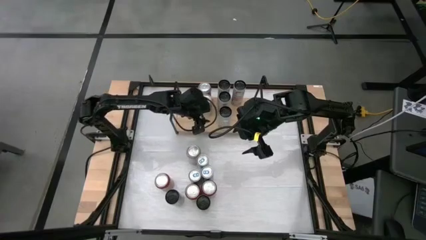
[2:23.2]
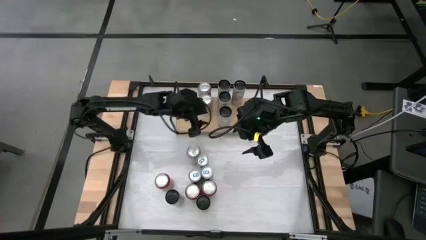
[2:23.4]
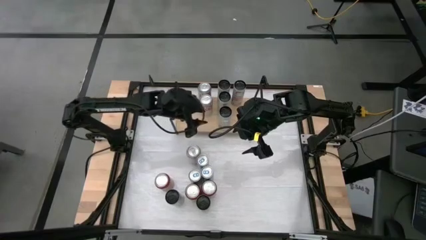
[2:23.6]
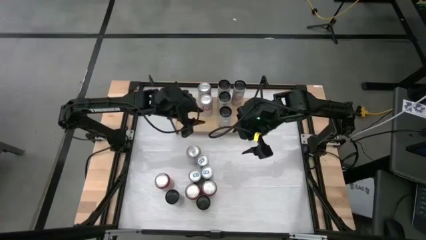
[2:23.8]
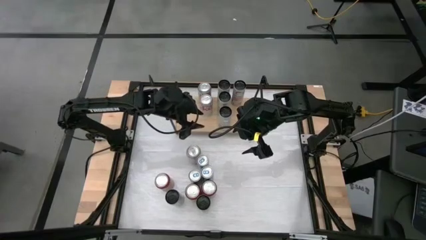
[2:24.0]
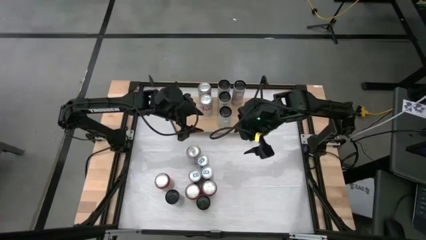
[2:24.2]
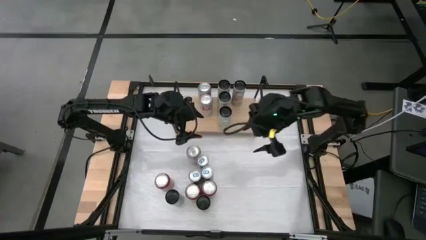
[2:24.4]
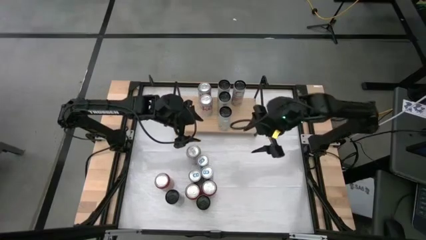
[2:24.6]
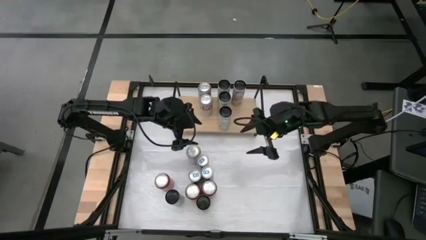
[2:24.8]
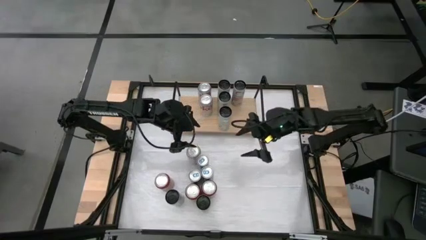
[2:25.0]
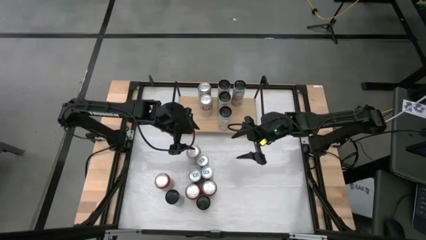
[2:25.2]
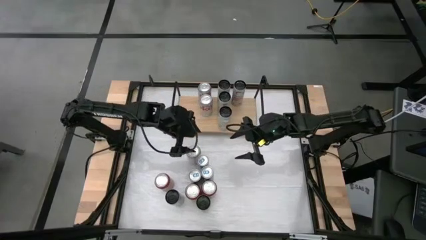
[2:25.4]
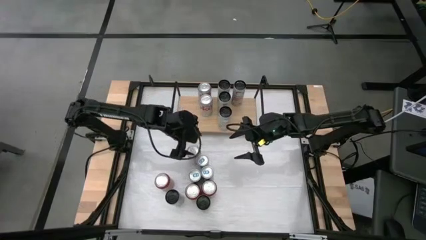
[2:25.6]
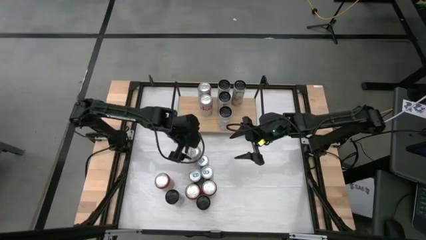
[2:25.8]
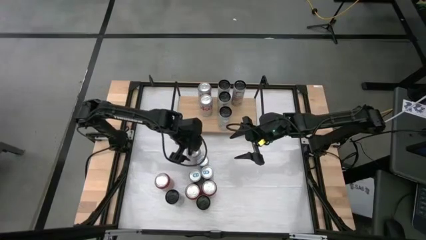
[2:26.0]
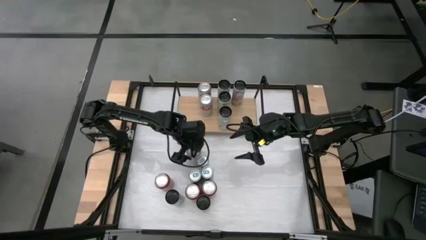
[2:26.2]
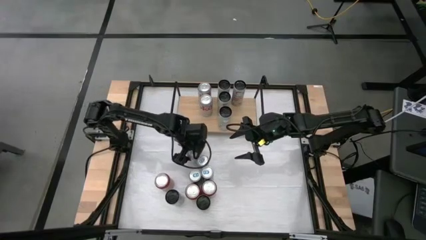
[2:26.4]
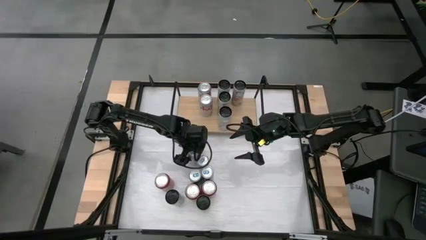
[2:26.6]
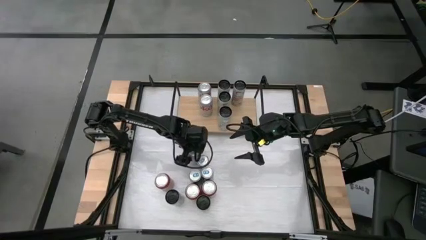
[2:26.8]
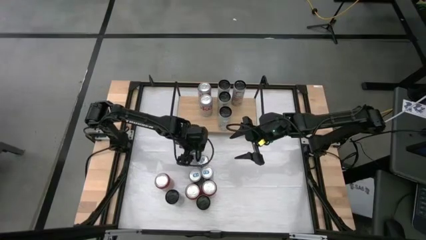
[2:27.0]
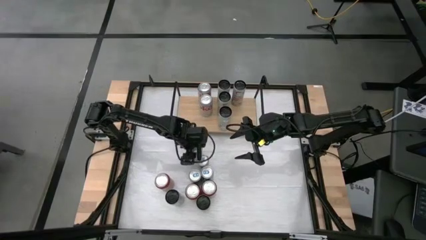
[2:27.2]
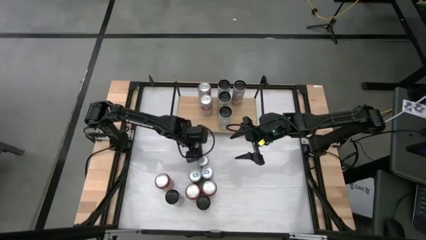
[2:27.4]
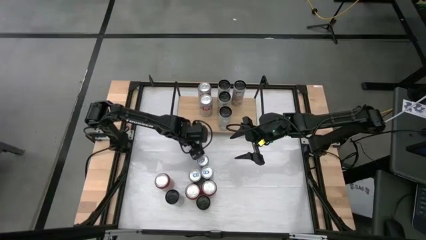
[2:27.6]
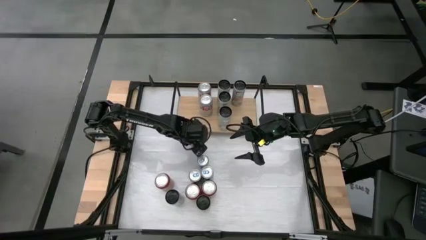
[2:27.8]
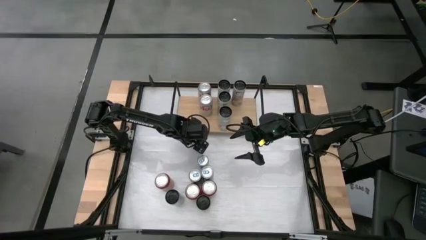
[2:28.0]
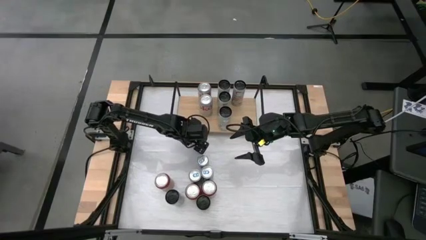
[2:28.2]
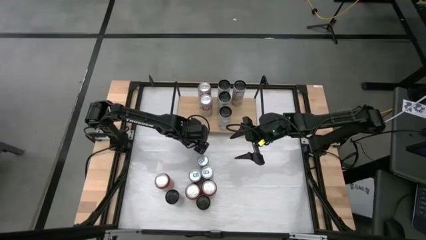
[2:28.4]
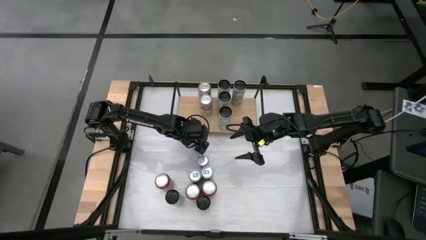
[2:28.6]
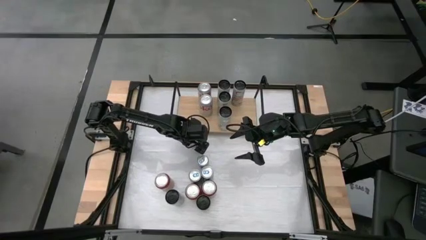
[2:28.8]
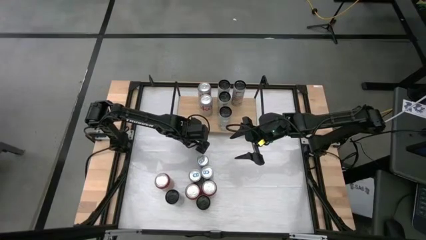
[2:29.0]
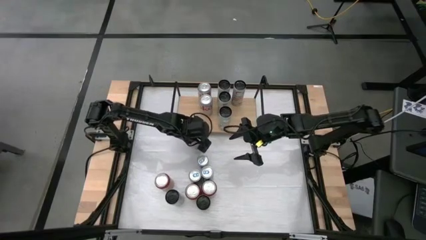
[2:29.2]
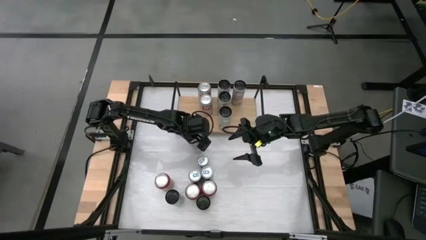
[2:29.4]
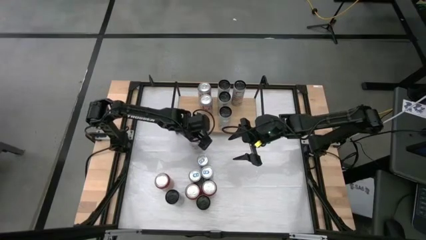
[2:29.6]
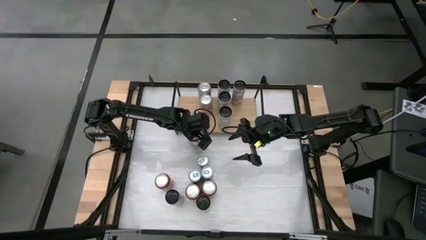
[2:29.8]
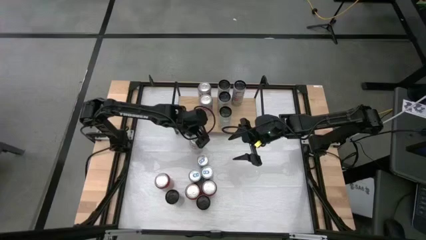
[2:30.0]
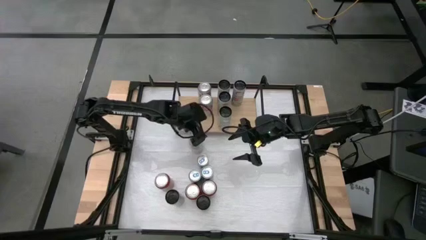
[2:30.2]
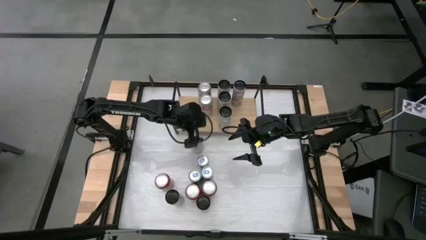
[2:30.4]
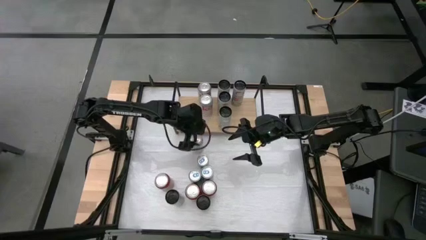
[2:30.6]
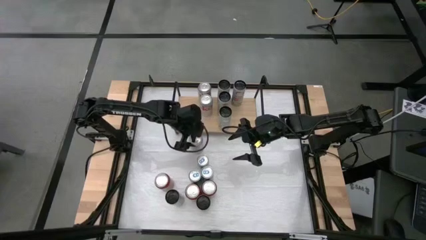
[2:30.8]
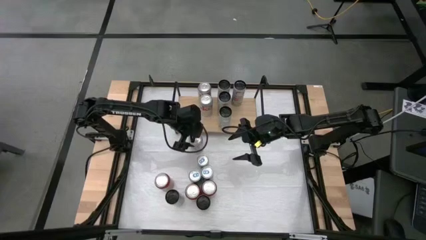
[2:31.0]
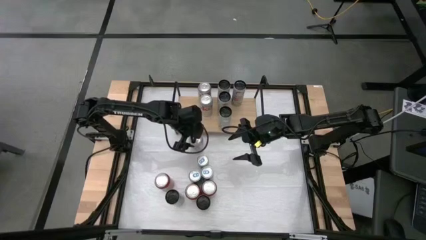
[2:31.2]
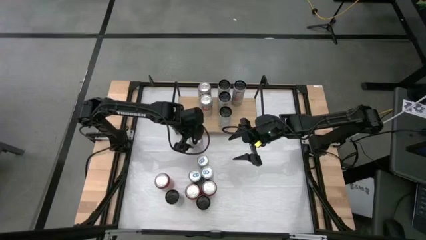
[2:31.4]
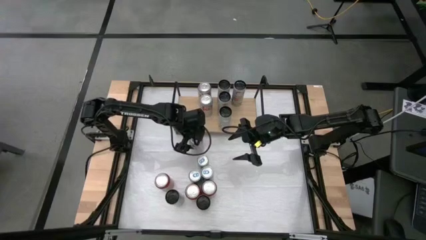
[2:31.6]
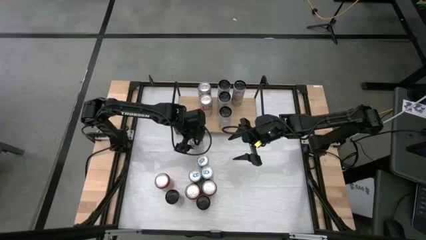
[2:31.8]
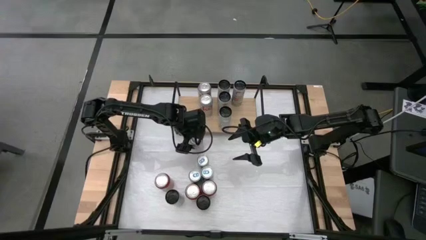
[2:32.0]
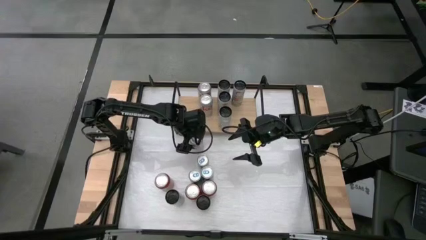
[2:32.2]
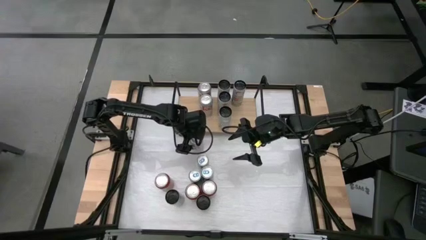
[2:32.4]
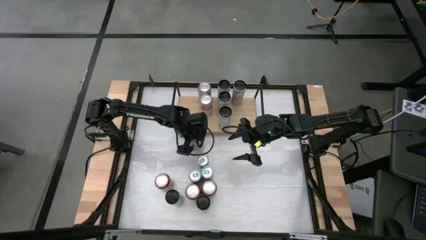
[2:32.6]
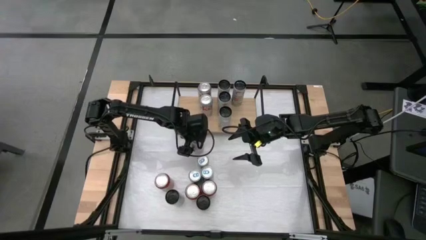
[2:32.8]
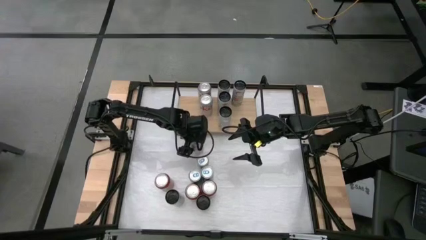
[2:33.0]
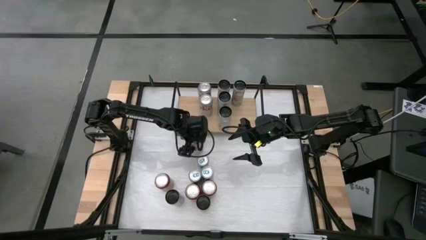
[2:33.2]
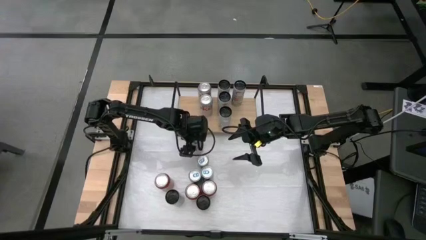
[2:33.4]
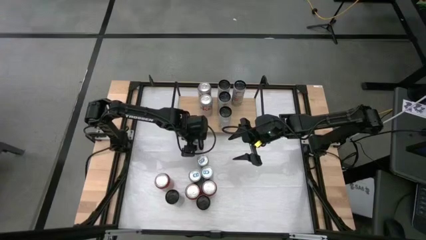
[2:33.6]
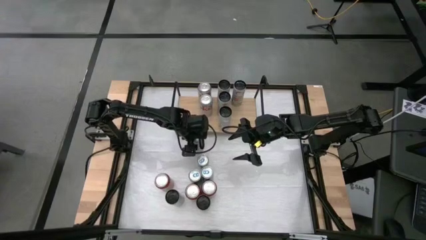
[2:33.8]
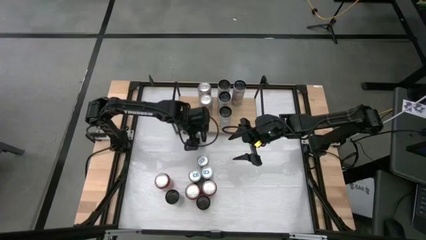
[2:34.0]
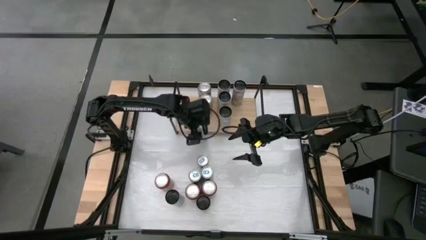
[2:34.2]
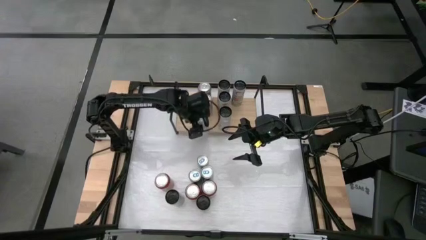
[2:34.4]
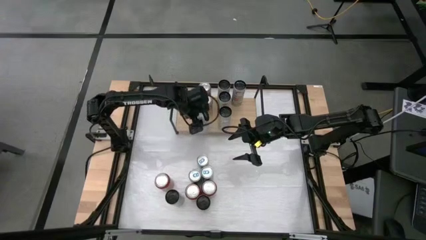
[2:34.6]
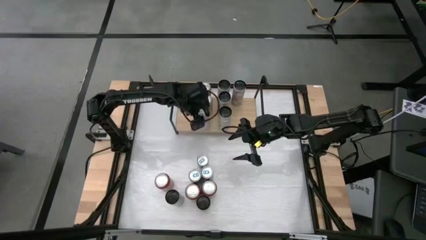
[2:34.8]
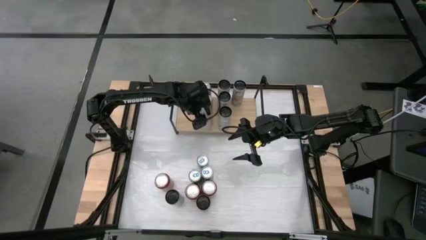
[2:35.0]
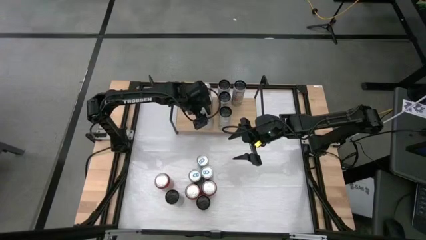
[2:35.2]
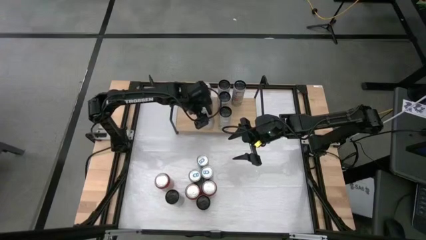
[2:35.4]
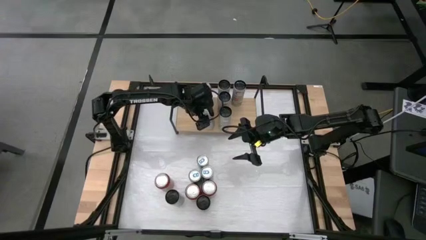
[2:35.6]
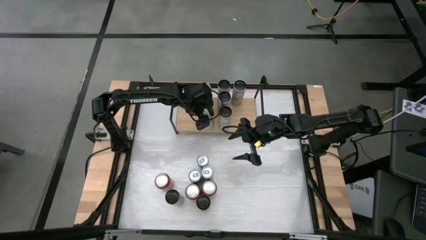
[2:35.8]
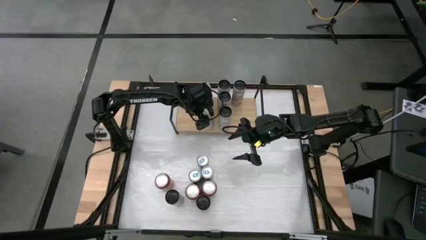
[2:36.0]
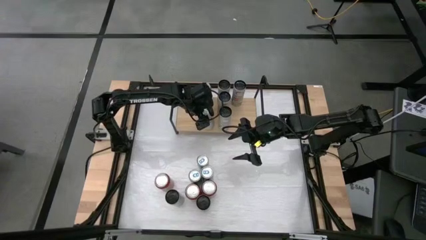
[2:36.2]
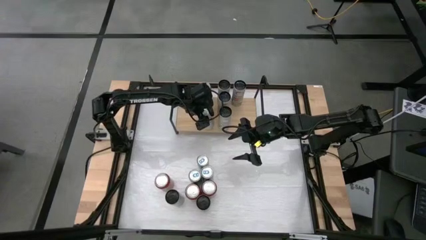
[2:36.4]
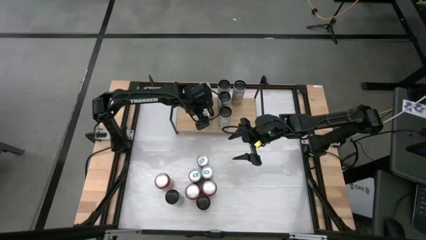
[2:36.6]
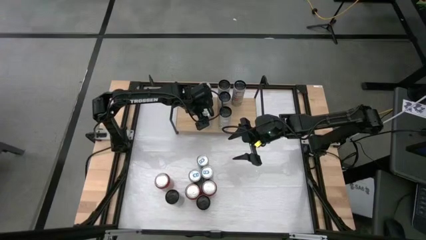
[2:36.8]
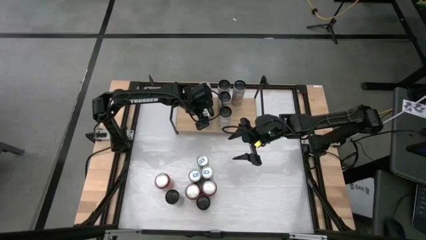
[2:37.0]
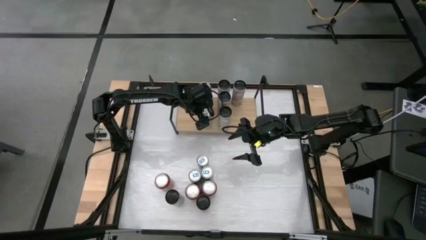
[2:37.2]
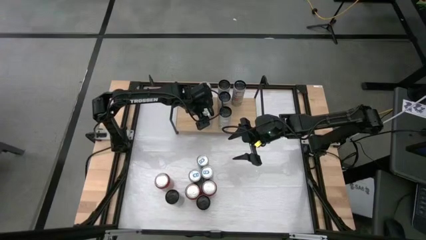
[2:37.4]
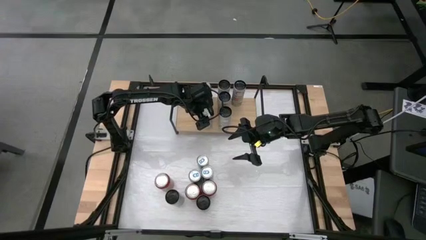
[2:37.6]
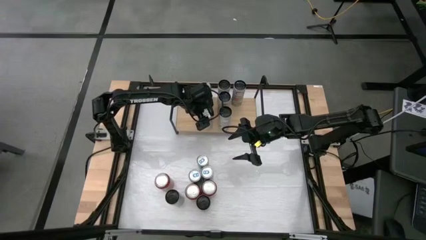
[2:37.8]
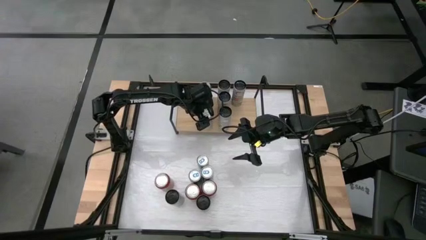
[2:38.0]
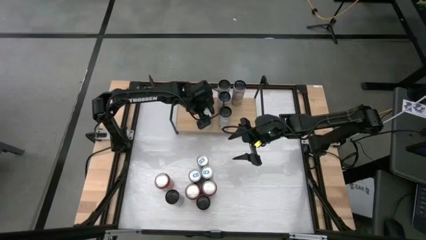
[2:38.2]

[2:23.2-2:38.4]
Task: Place canned beverage on shelf
Put the red silver soda can onto the shelf aligned with the other red silver soda cans

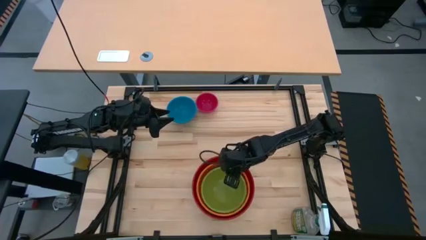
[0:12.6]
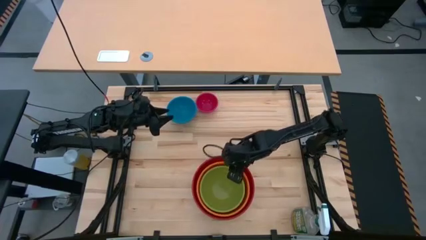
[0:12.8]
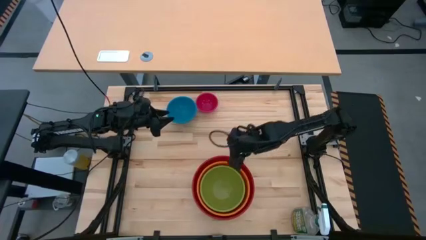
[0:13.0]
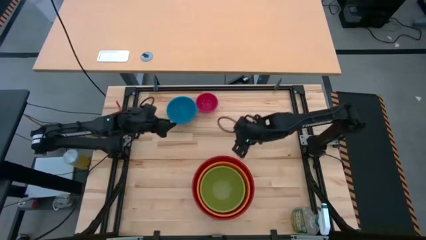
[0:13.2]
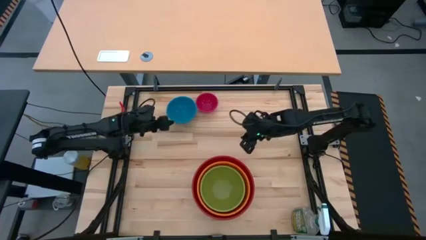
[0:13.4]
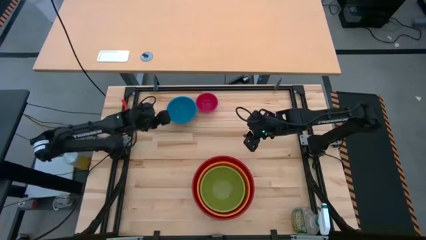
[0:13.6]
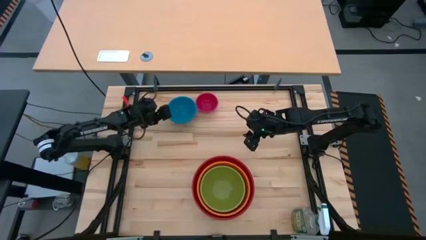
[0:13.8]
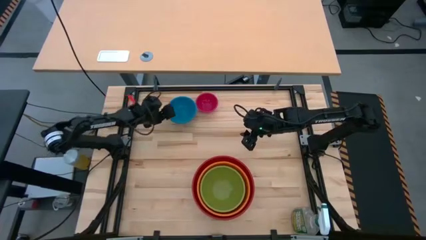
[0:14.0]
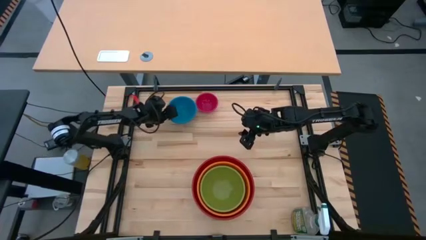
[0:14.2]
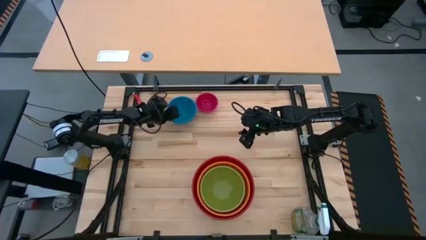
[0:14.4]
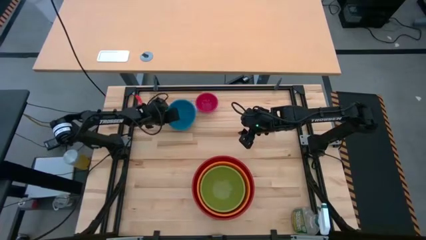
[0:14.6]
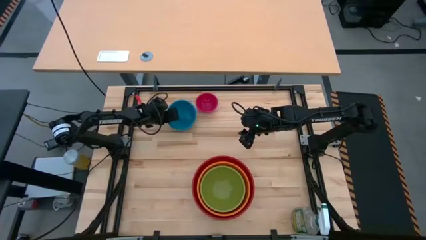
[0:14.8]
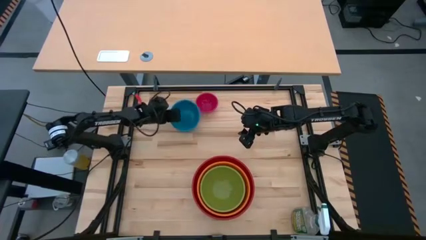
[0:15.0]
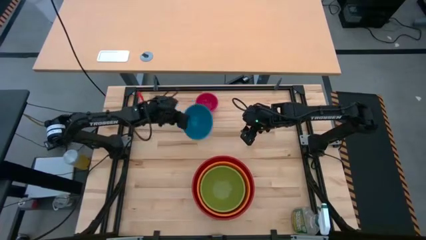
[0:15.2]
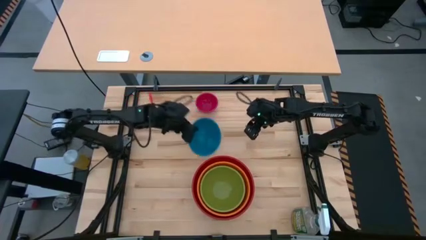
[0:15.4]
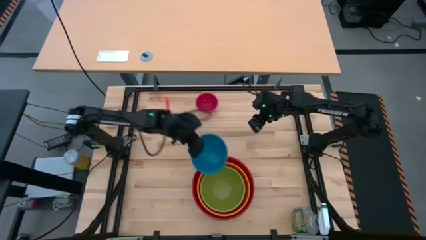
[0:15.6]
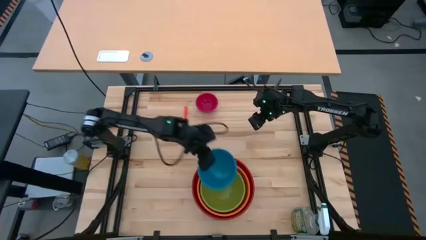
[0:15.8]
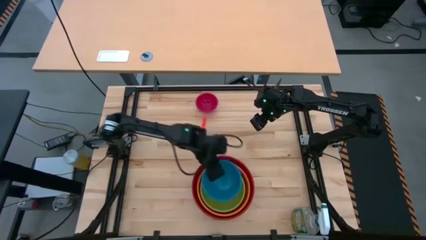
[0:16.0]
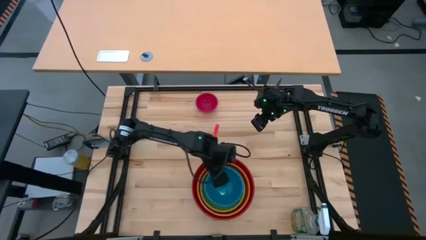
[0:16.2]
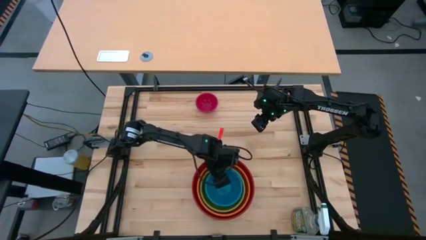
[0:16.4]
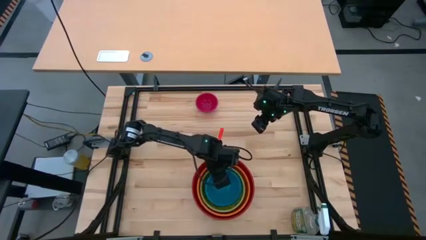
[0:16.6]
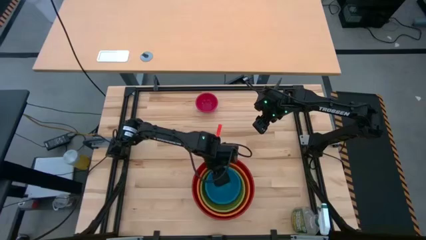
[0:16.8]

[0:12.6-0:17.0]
Task: Nest bowls inside each other by size order
Stack the blue bowl on top of the green bowl
